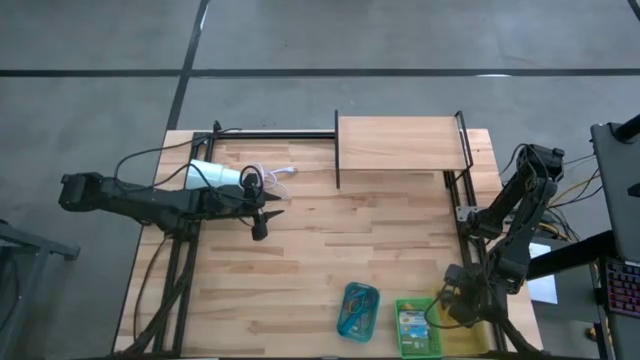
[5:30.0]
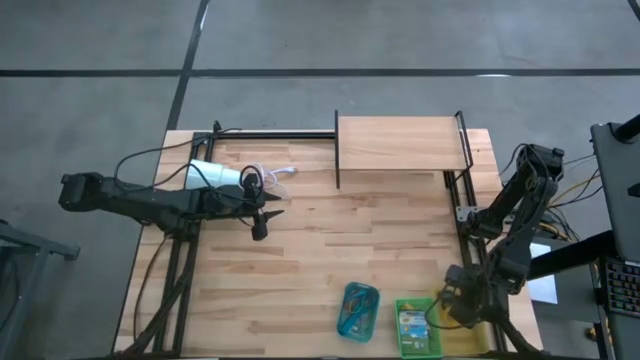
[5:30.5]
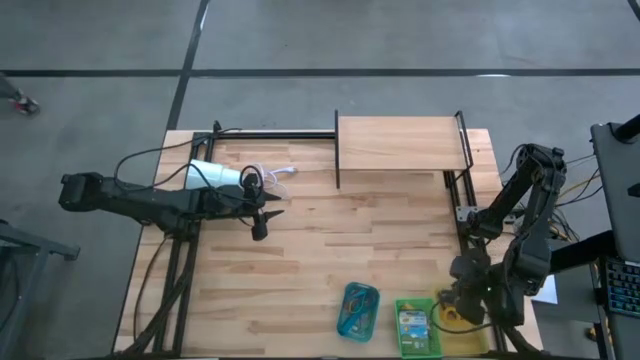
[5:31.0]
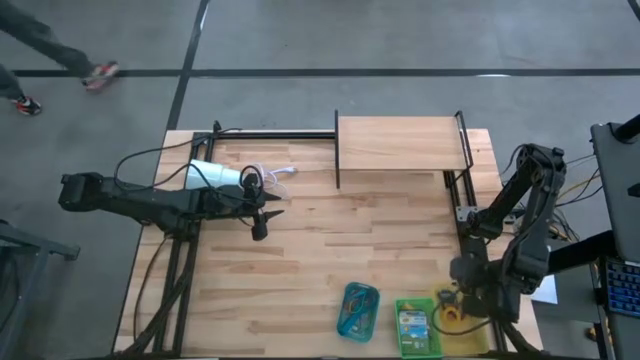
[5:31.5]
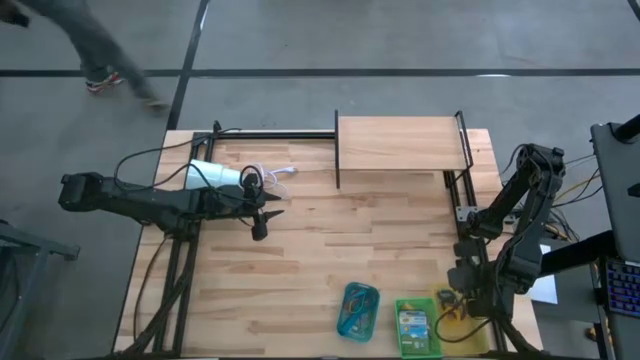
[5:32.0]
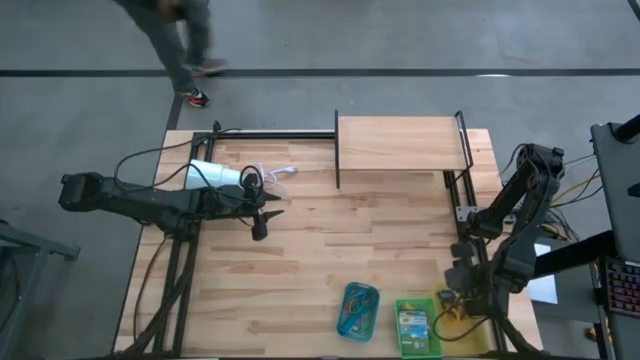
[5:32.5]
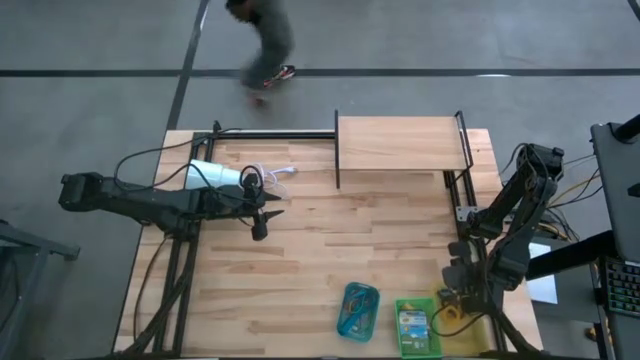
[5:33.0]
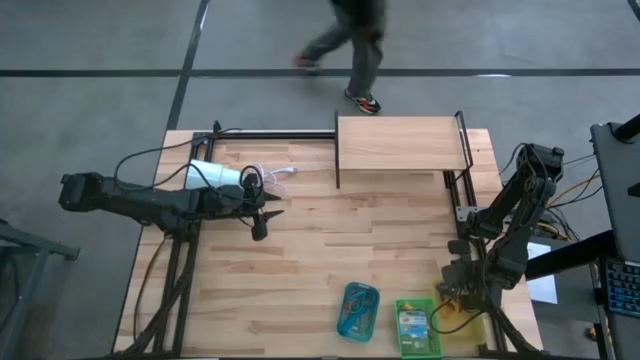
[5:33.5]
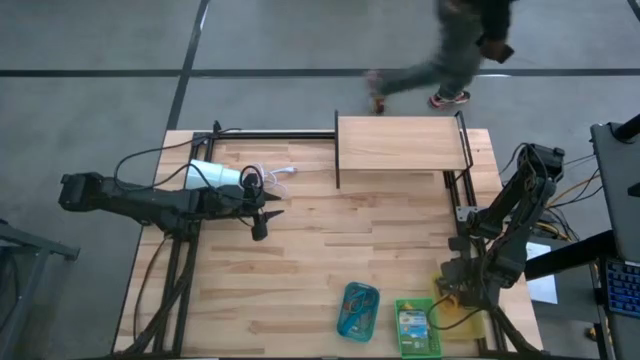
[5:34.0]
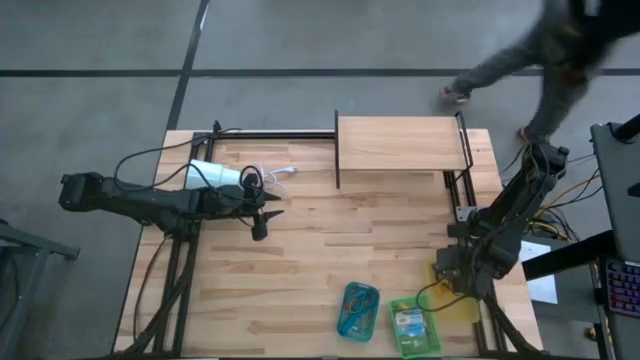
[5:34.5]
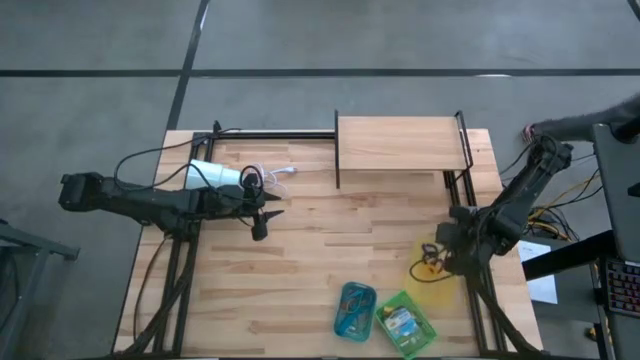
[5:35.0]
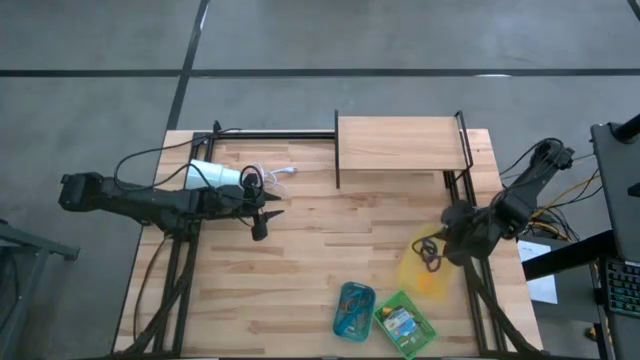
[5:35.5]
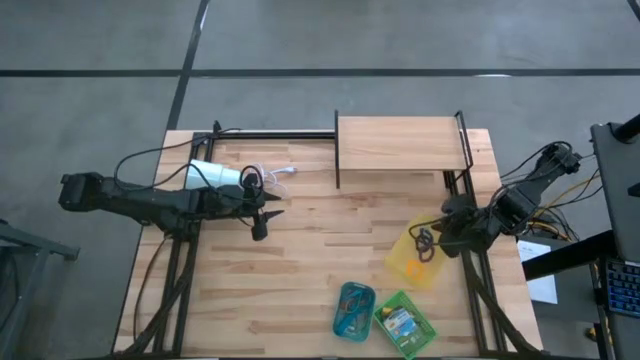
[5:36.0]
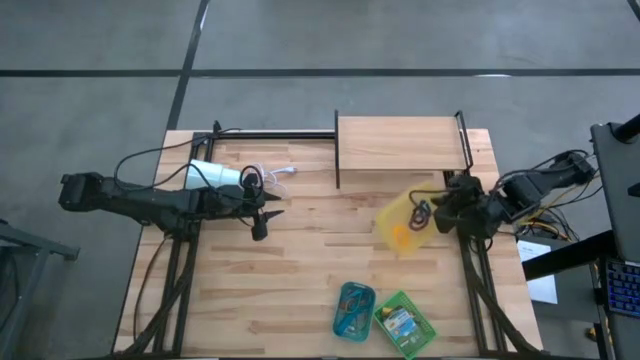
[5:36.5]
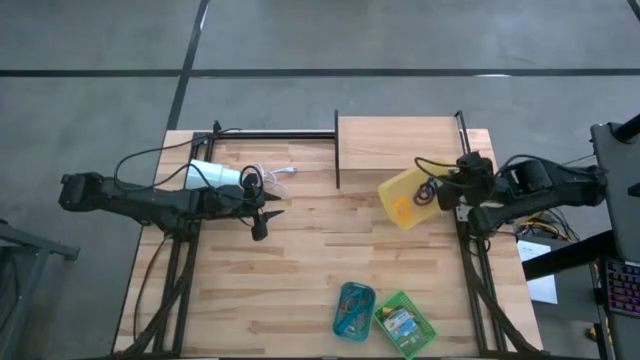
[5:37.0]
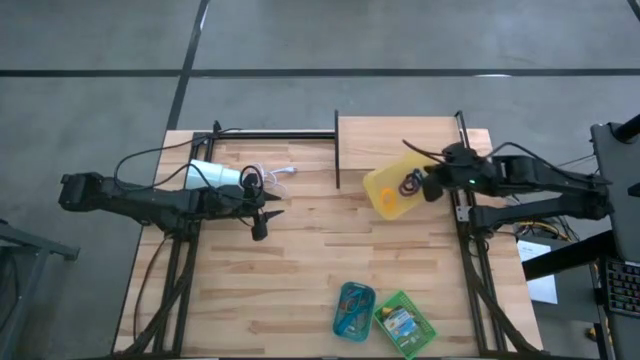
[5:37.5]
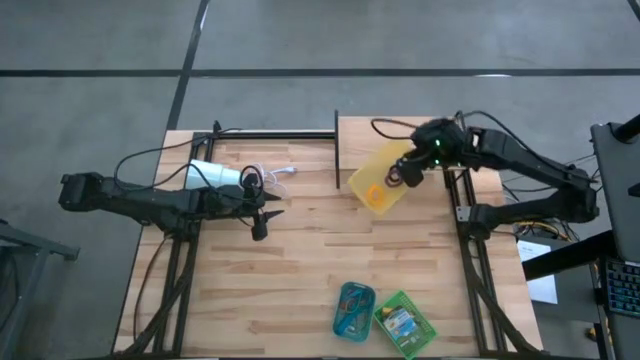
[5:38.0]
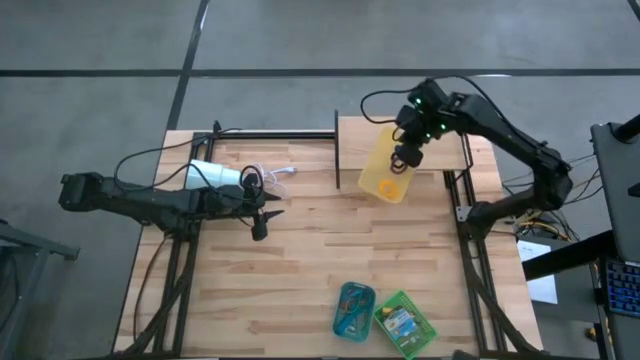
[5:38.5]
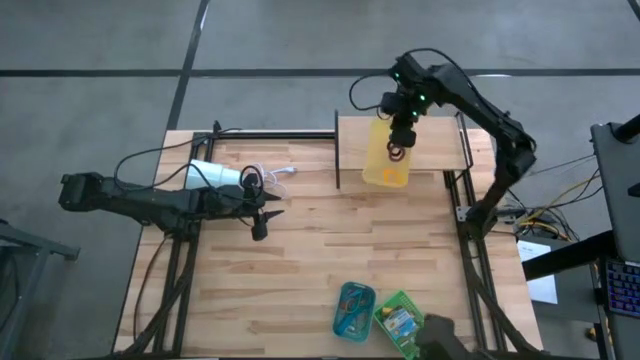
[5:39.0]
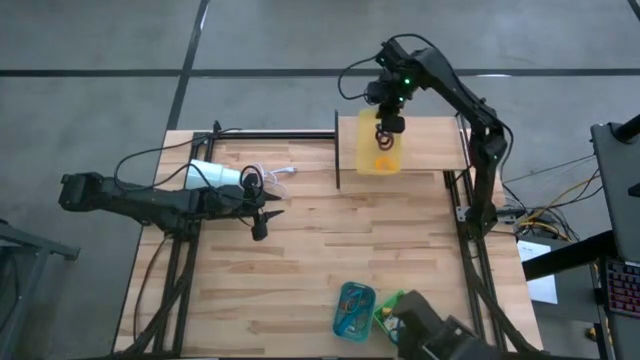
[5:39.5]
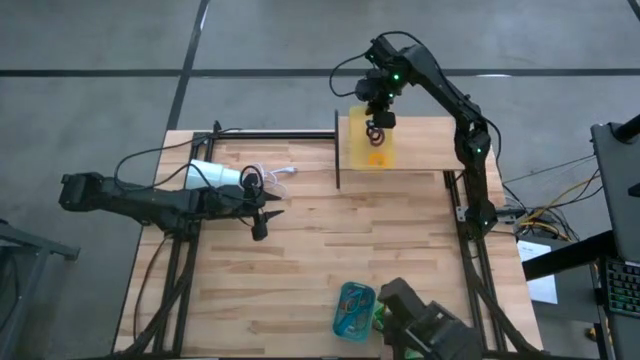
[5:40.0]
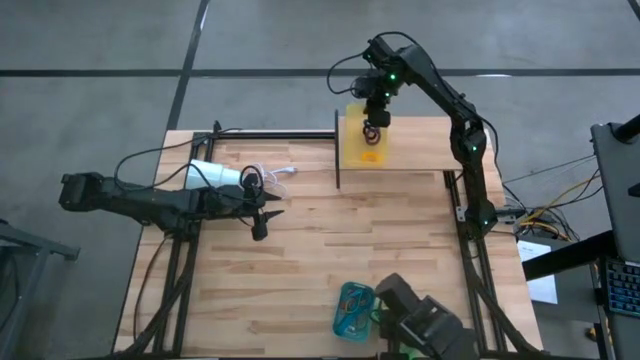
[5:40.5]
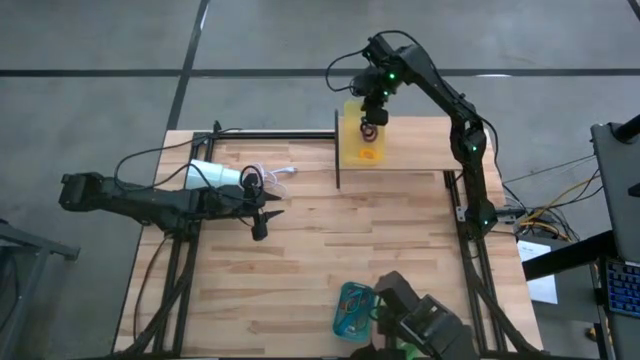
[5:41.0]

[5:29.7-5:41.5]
Task: Pick & Place Office Desk Supplies
Put the yellow bin on the shelf

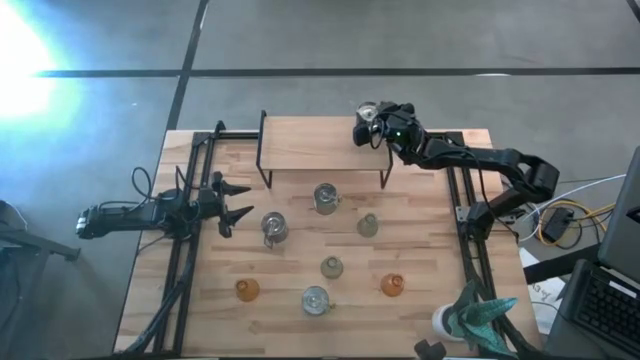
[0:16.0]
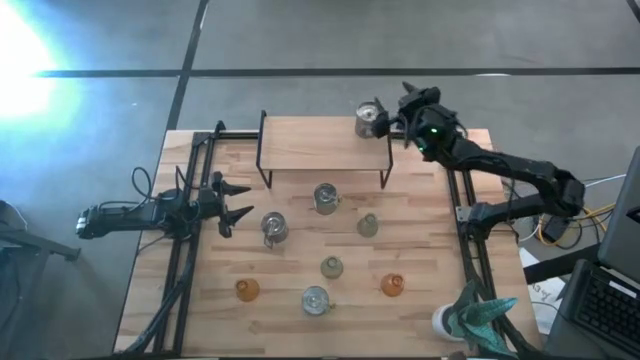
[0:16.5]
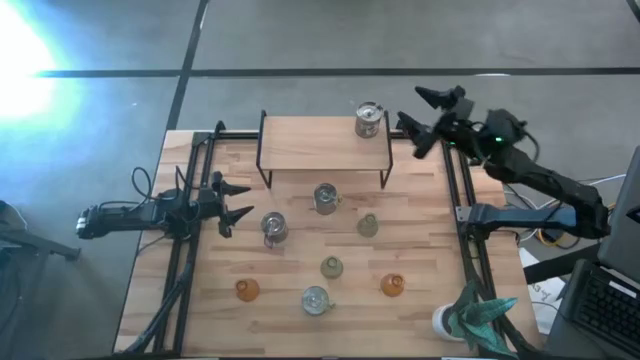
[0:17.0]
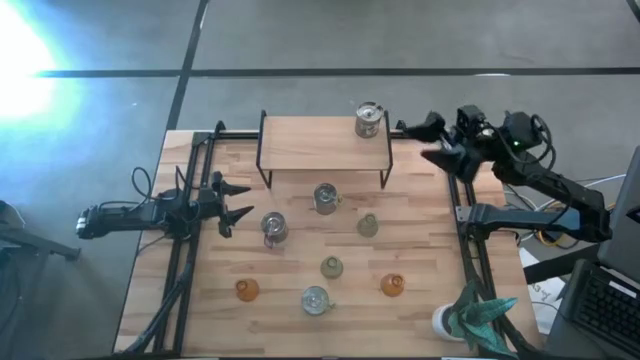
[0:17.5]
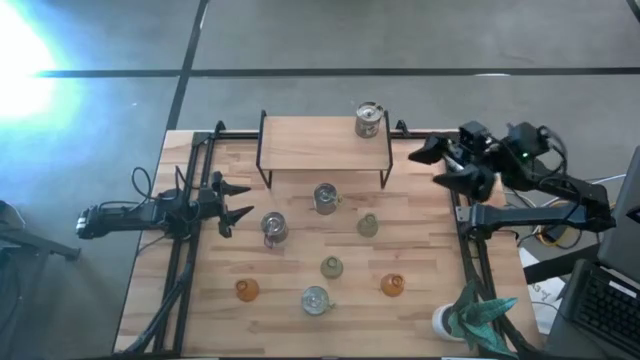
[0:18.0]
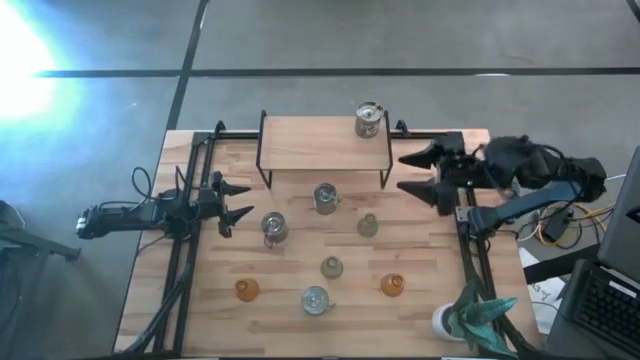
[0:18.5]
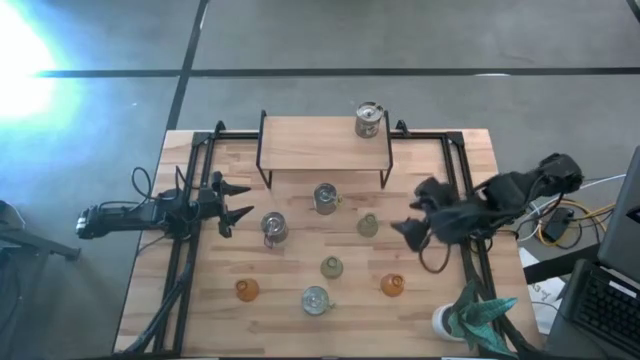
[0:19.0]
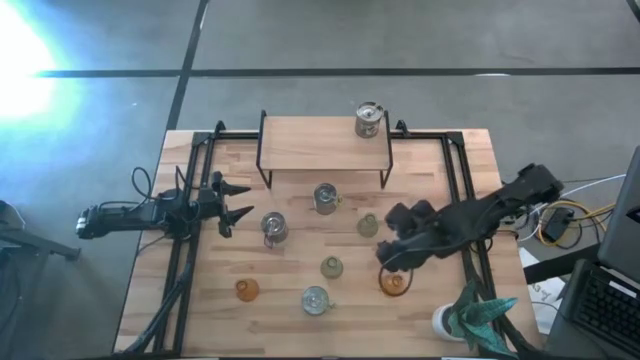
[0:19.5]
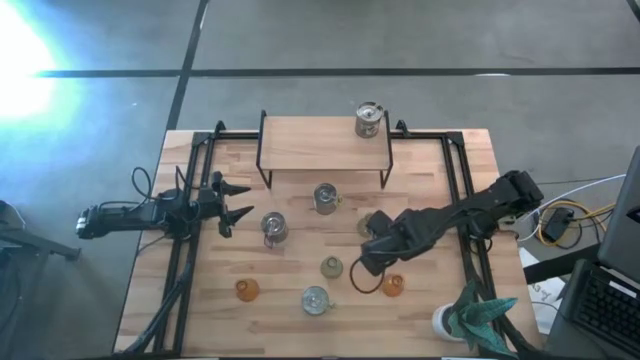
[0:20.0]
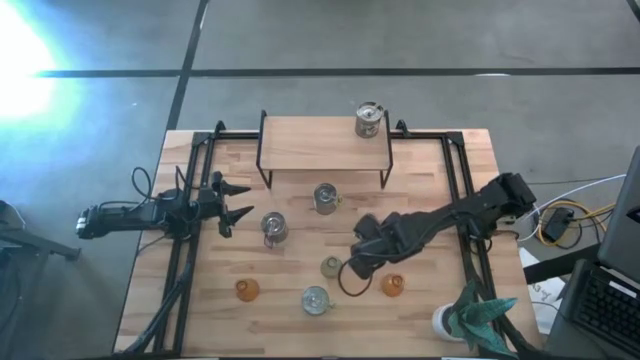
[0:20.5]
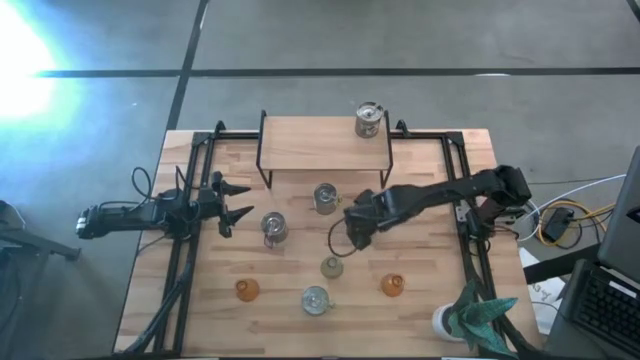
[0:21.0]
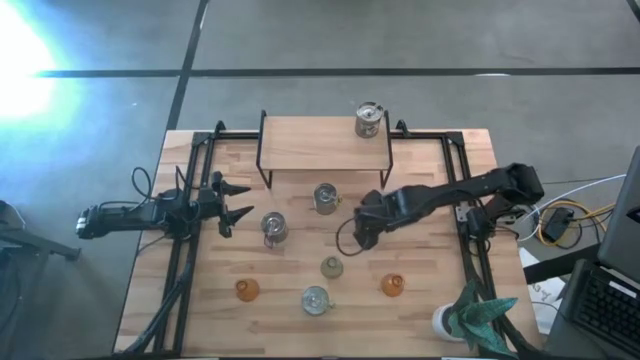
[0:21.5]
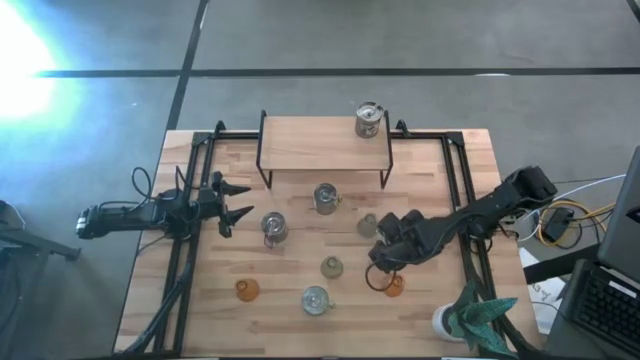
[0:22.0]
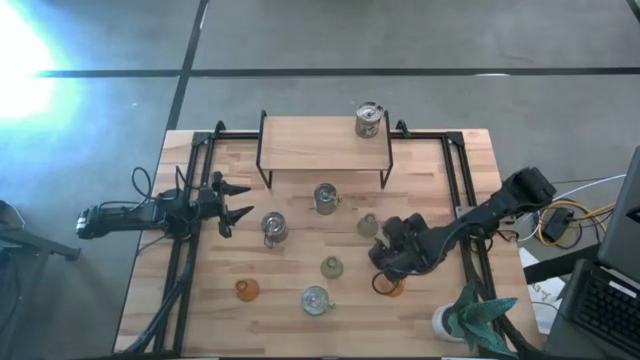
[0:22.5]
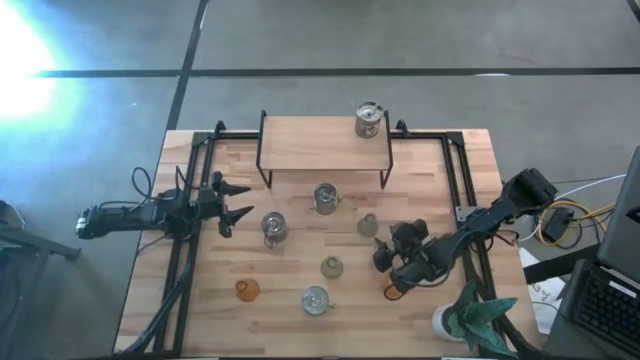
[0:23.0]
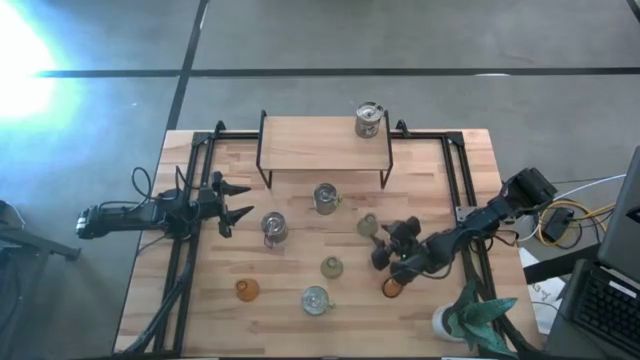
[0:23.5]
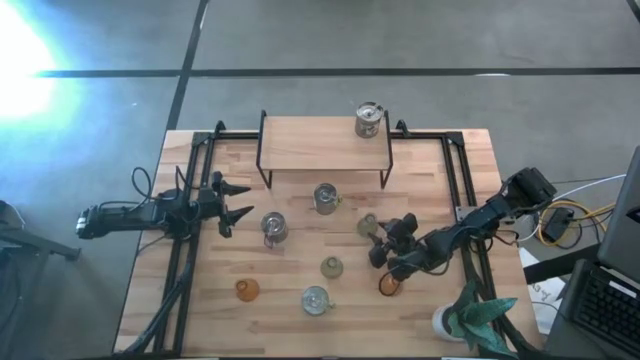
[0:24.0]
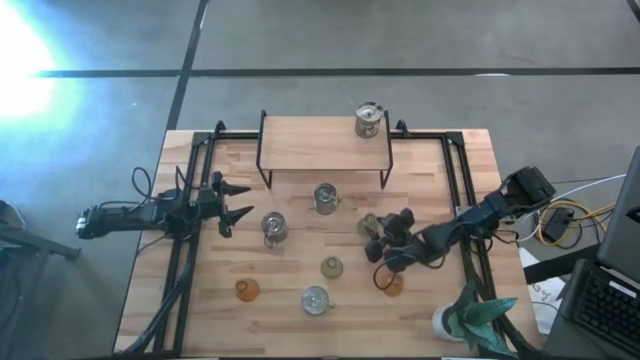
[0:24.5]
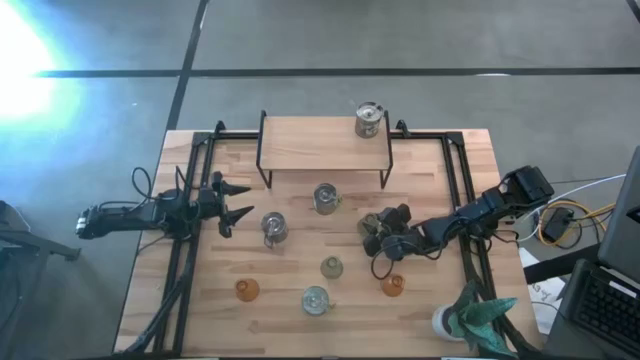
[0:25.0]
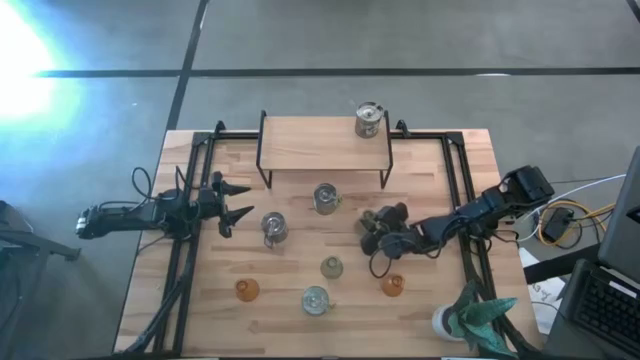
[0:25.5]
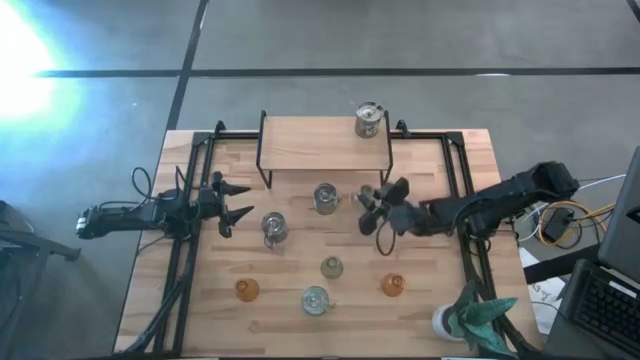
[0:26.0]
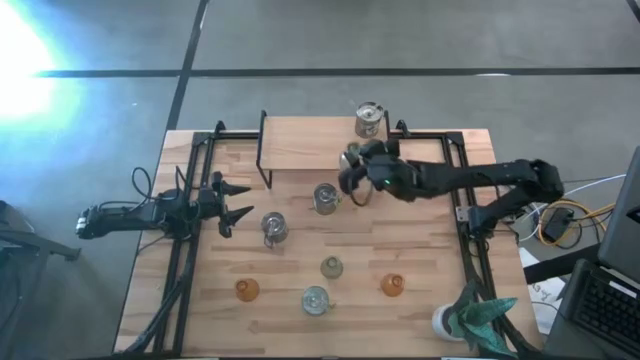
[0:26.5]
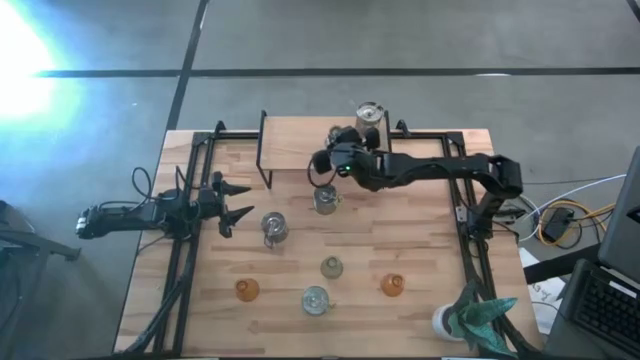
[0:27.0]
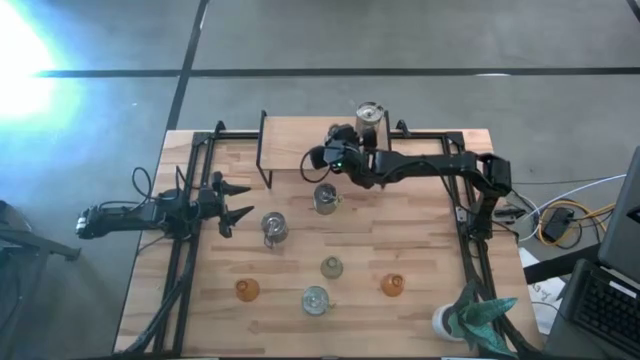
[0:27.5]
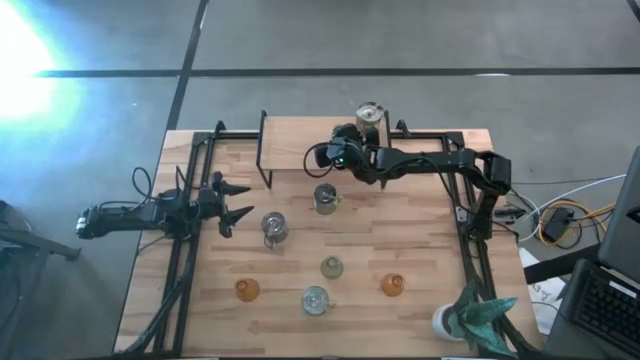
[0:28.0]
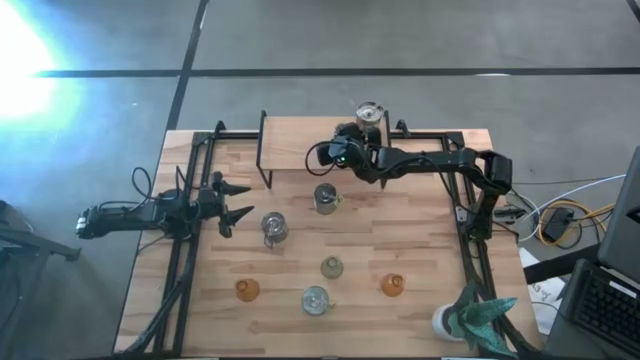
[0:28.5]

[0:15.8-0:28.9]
Task: Pick & Place candle stick holders
Put the top green glass candle holder on the shelf
